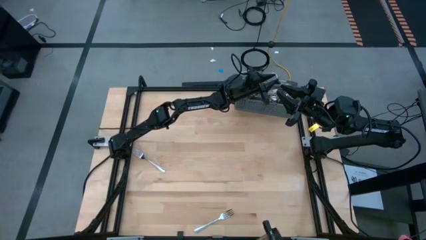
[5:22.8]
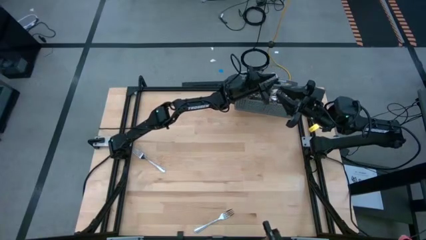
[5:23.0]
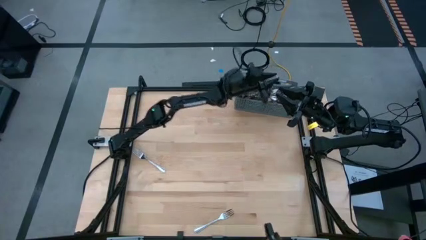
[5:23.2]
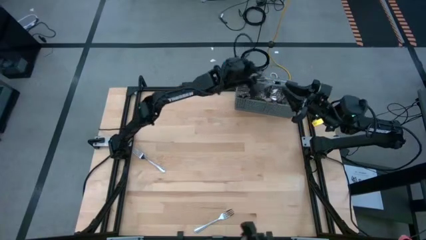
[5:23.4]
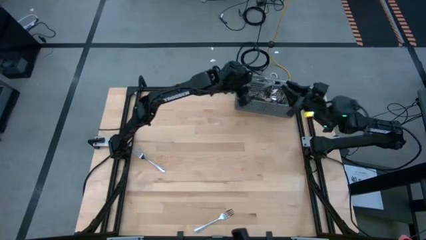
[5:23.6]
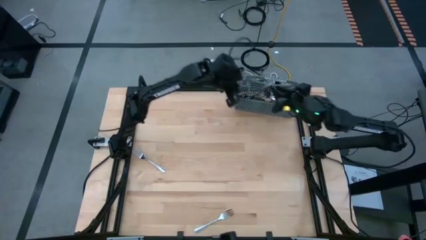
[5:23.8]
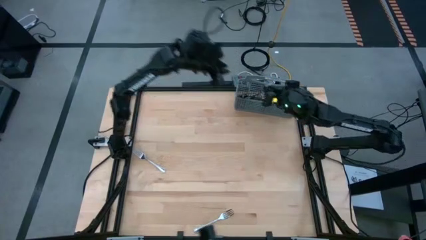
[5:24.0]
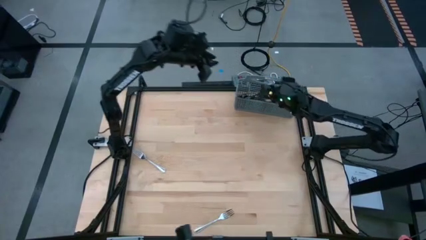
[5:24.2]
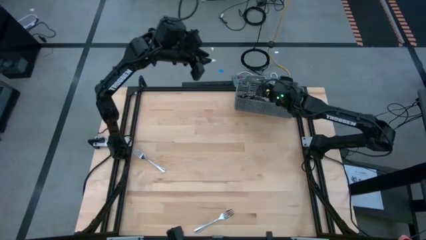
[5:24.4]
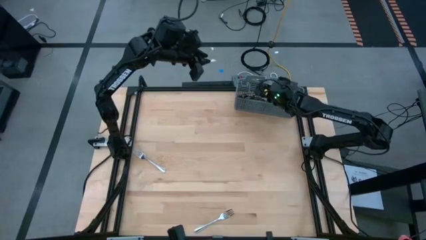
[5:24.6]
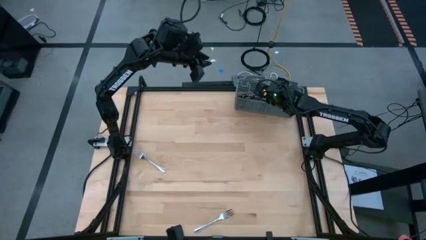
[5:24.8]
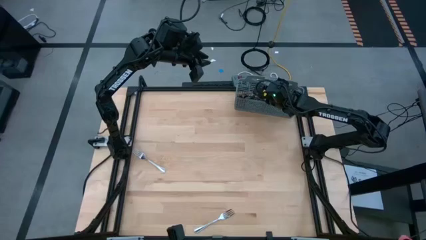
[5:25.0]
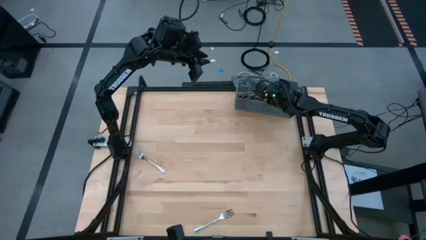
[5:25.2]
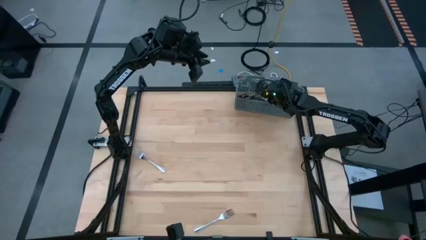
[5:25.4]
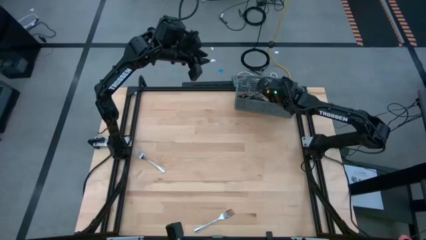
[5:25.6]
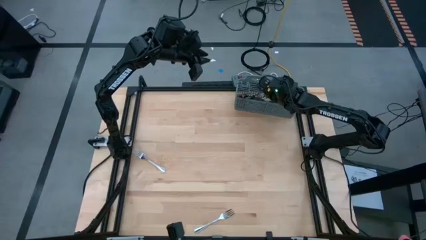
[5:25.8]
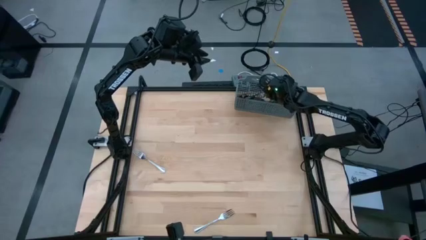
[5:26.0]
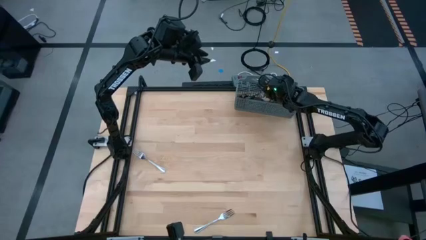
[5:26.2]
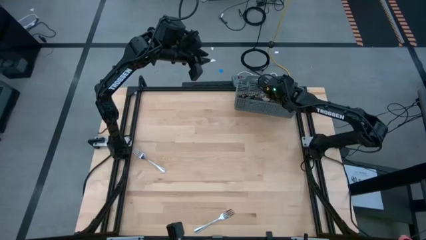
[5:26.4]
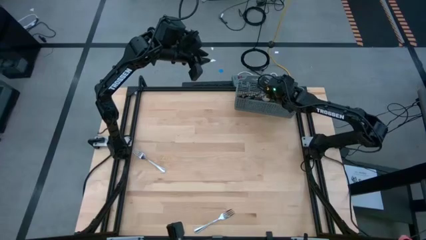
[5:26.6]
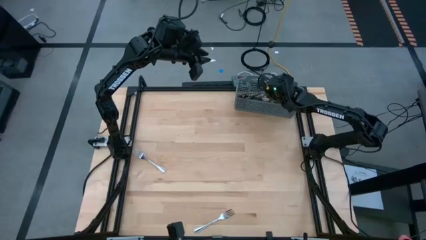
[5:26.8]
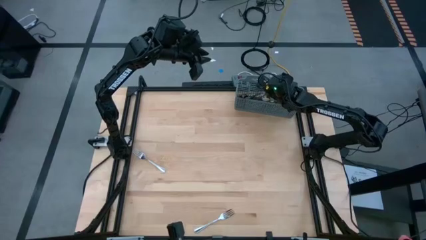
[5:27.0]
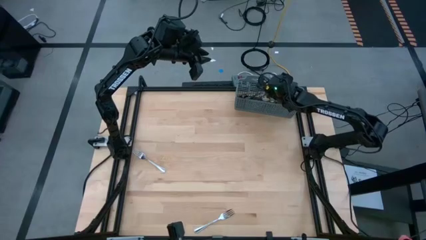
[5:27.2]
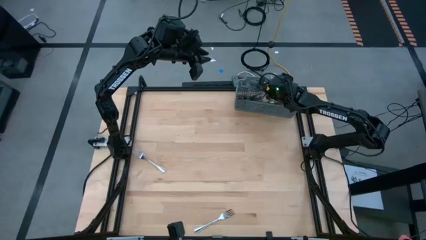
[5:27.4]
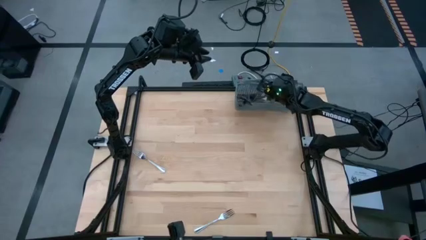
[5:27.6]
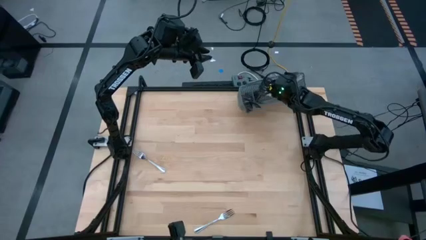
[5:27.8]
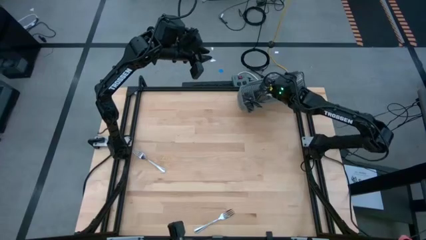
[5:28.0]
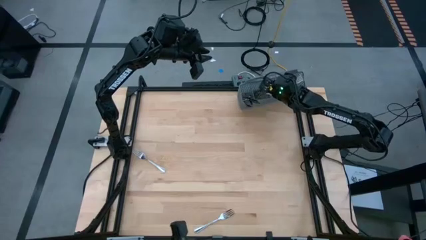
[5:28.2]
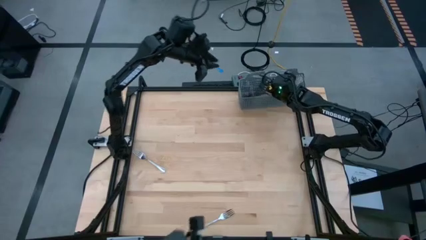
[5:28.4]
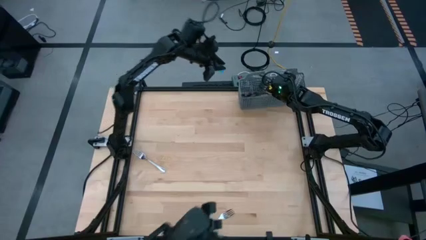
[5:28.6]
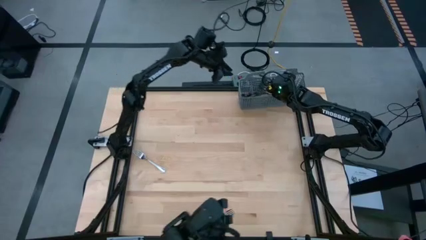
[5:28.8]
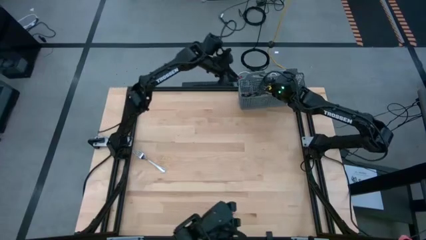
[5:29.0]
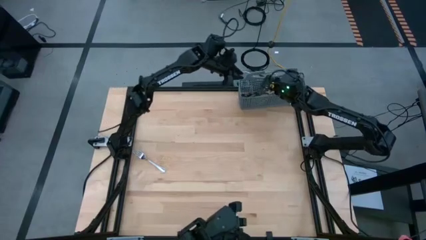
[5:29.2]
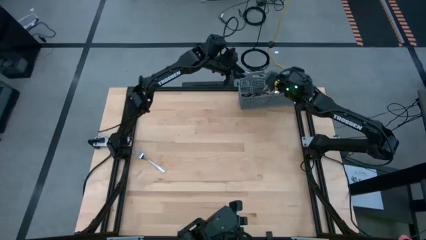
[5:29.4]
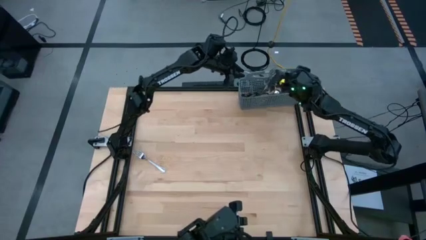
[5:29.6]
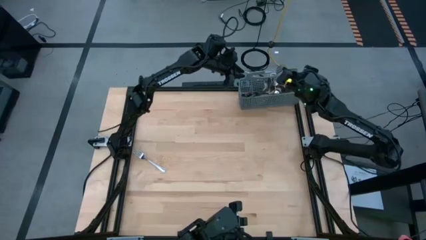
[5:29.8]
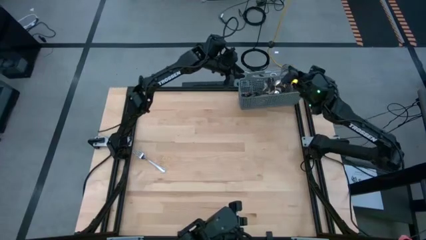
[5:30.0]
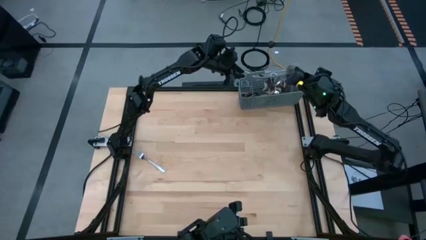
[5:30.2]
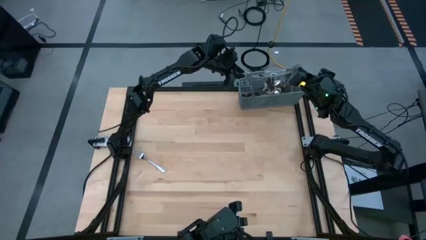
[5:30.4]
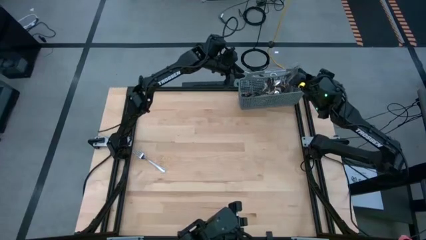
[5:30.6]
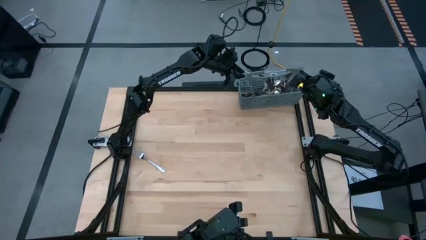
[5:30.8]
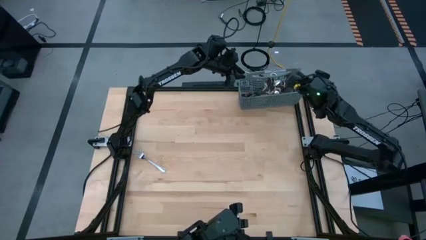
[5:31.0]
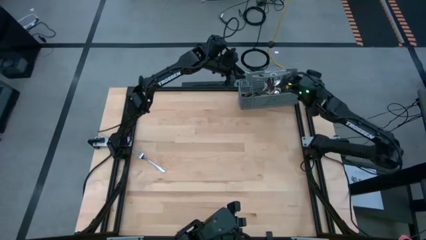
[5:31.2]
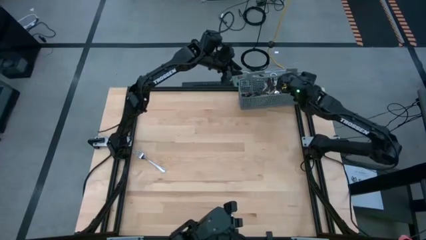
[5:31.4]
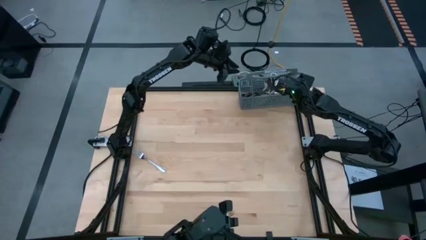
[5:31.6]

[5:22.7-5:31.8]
Task: Sort silverware
Adjust the silver fork into the silverware basket

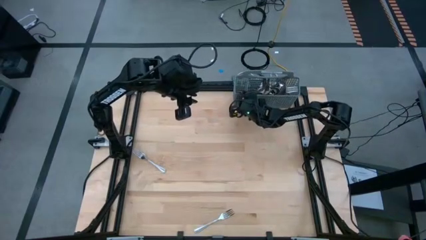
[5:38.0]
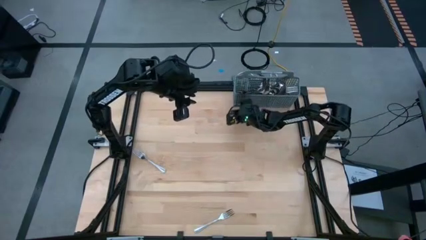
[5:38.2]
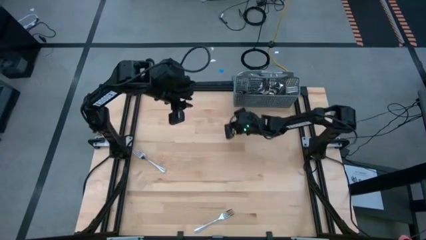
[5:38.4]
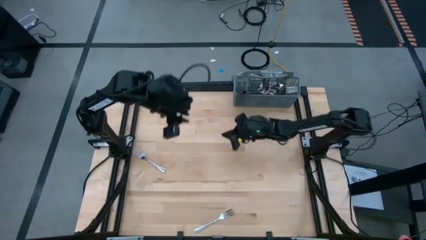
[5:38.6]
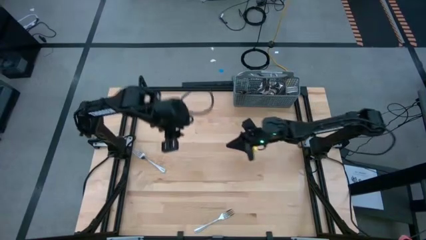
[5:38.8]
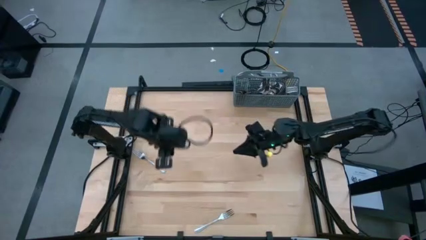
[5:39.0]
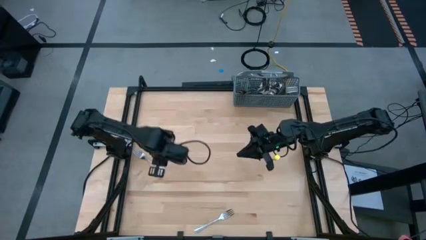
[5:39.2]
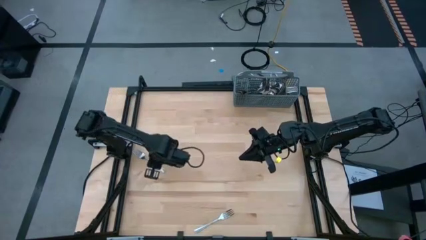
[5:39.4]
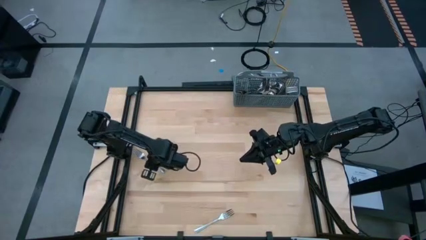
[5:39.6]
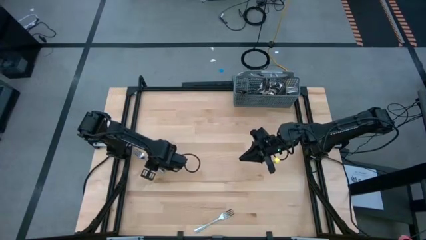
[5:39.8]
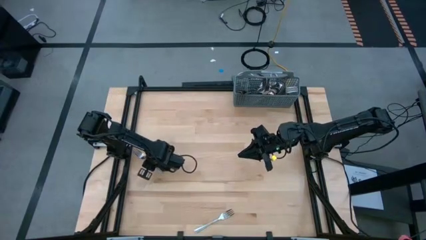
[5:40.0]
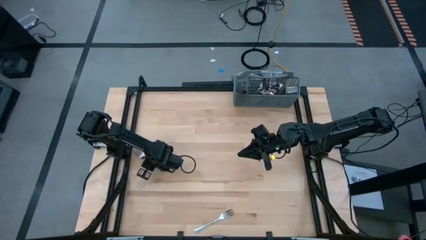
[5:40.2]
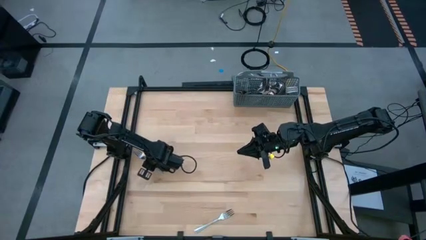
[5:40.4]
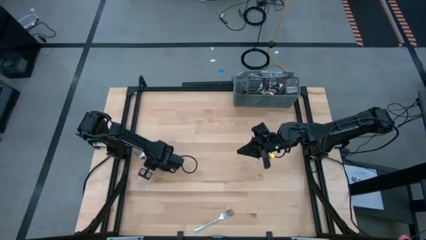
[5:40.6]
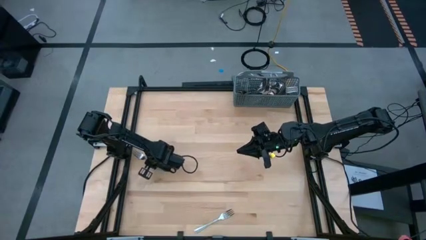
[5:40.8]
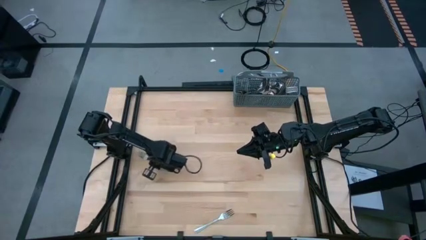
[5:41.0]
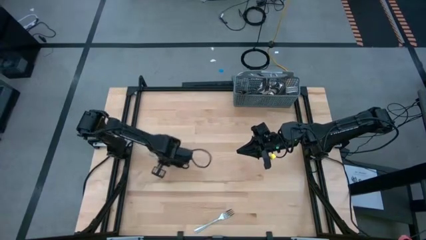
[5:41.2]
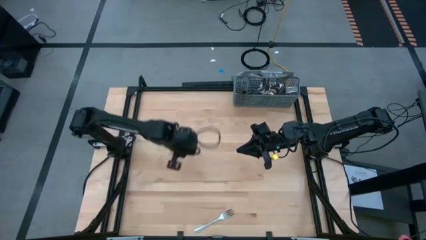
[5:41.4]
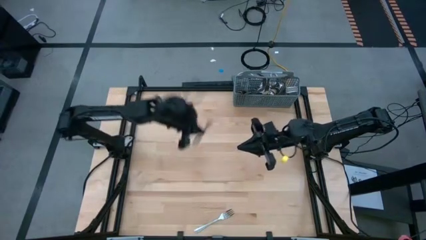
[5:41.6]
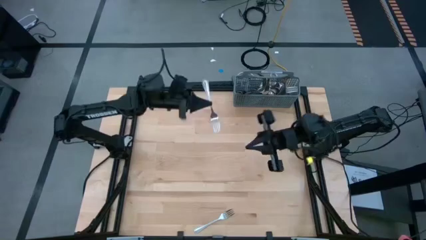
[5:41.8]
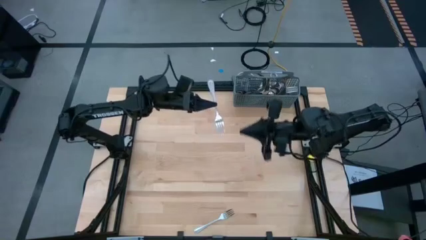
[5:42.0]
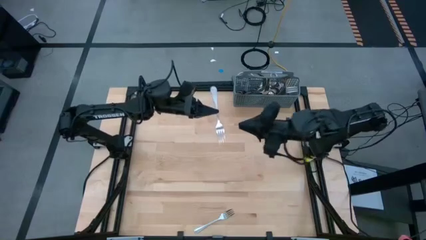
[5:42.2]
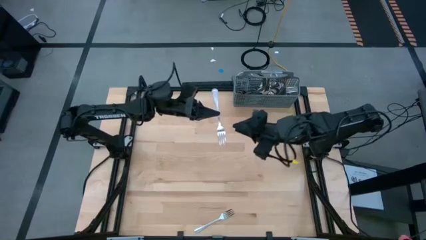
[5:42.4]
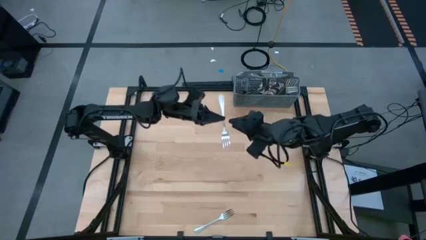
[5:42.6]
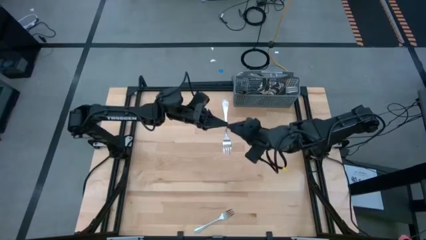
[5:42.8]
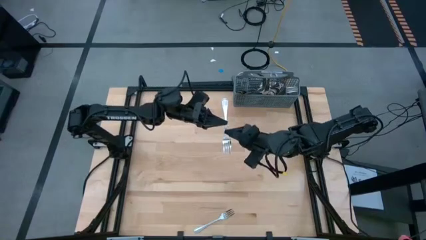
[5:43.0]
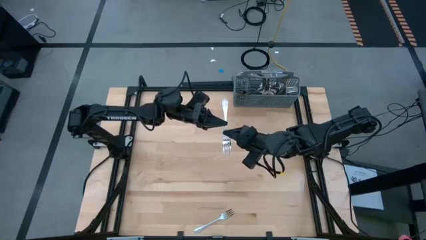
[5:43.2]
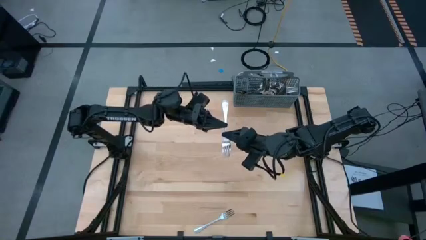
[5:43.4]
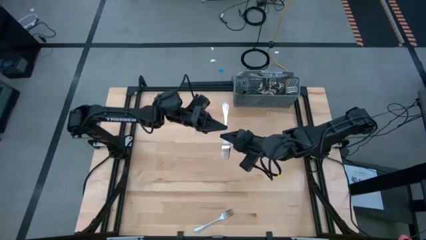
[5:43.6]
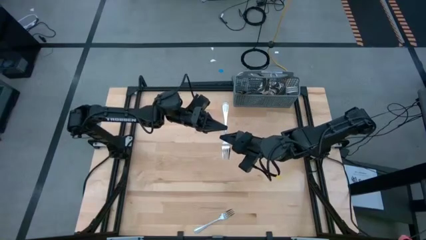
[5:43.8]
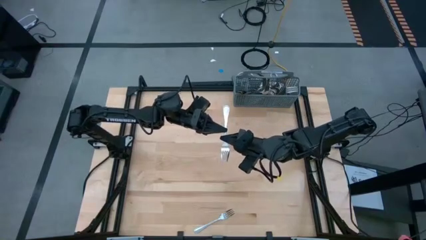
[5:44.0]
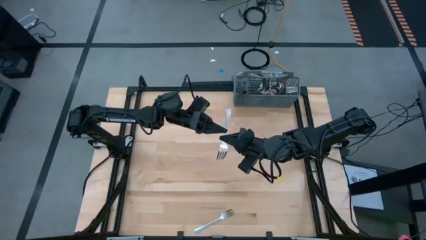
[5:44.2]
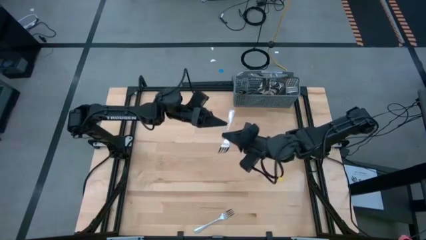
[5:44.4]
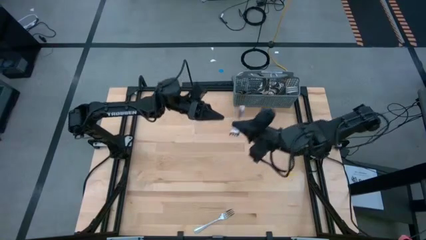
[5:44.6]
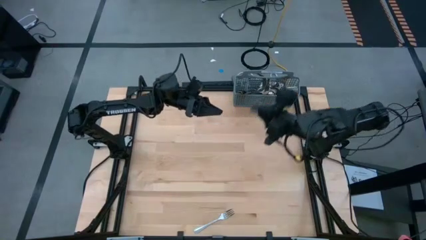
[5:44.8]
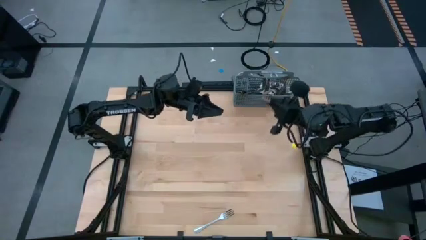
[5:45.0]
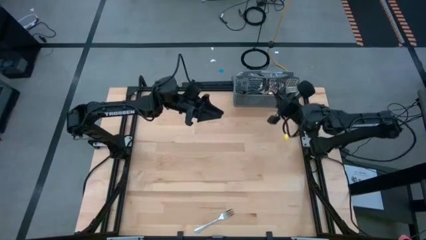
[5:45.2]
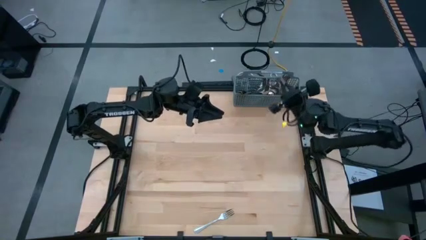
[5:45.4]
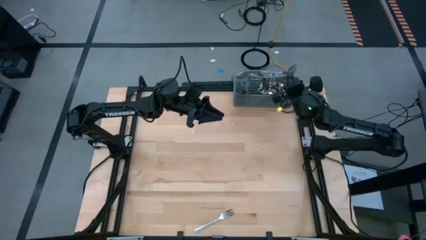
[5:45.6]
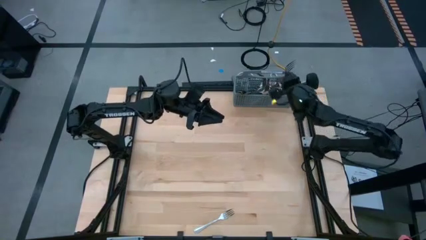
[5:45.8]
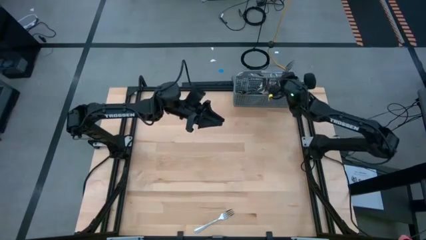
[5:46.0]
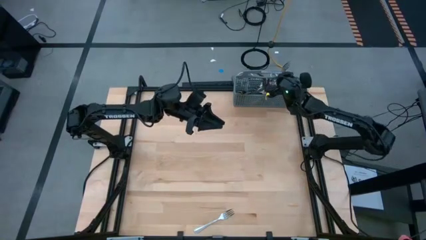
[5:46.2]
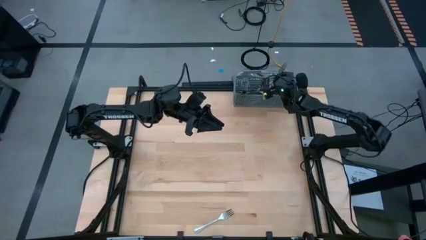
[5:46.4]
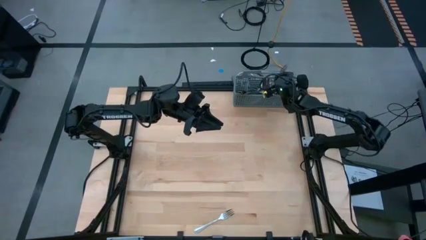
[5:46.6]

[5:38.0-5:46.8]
Put the silver fork into the silverware basket
